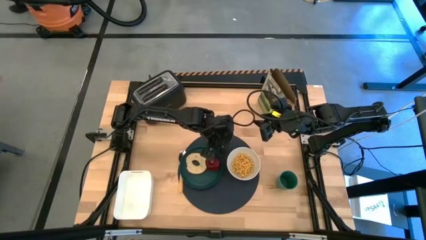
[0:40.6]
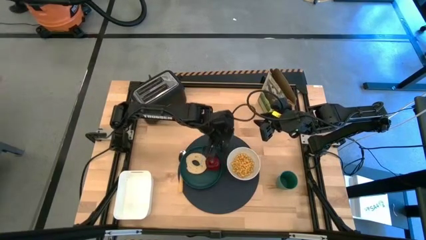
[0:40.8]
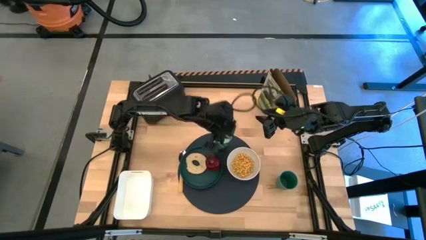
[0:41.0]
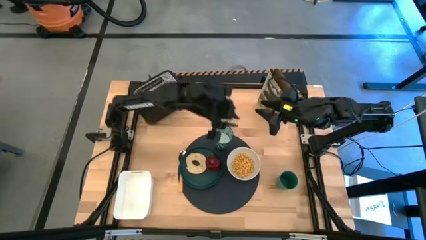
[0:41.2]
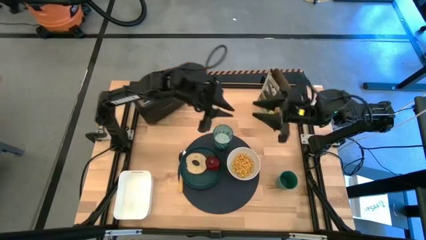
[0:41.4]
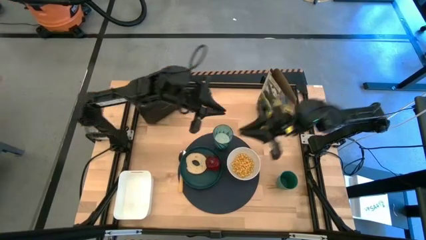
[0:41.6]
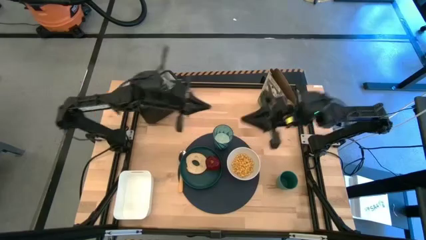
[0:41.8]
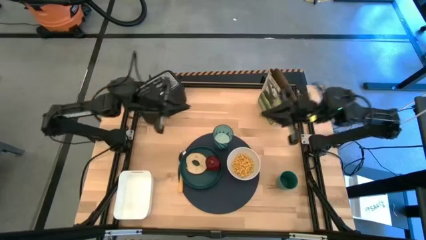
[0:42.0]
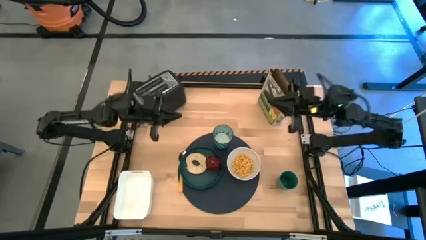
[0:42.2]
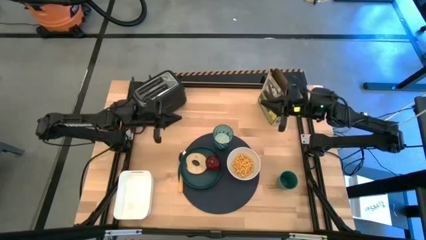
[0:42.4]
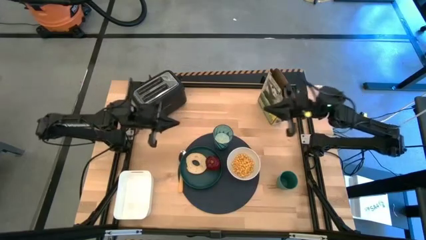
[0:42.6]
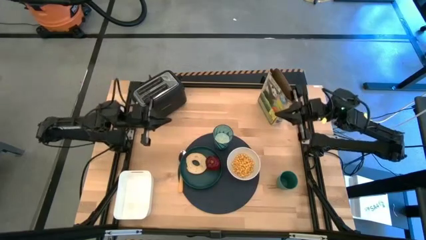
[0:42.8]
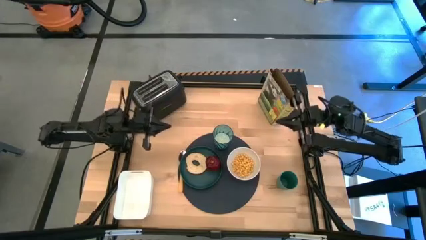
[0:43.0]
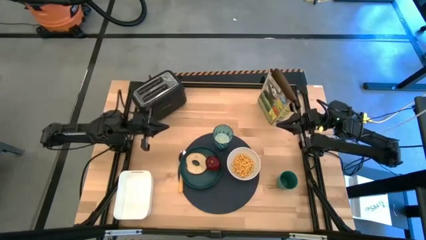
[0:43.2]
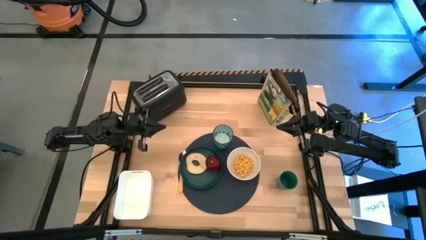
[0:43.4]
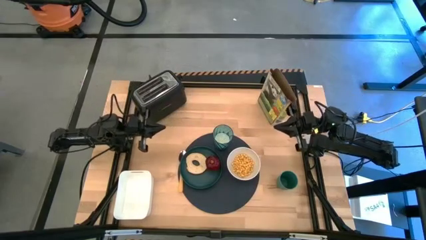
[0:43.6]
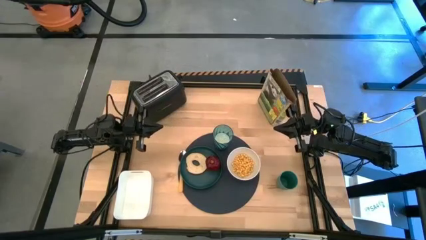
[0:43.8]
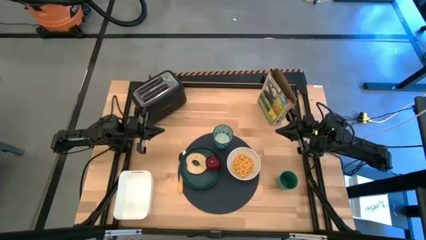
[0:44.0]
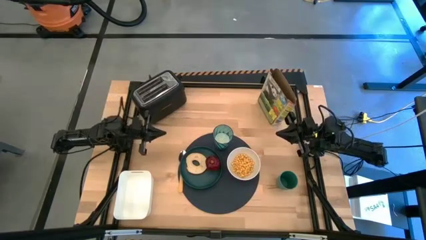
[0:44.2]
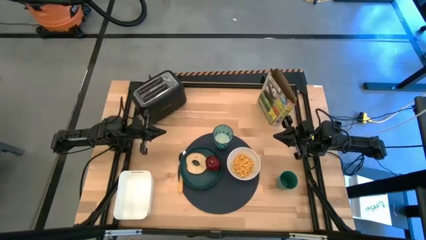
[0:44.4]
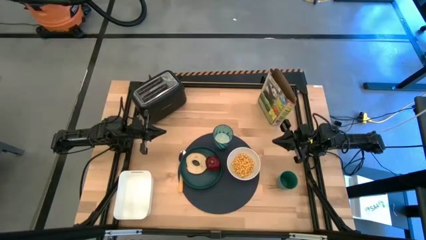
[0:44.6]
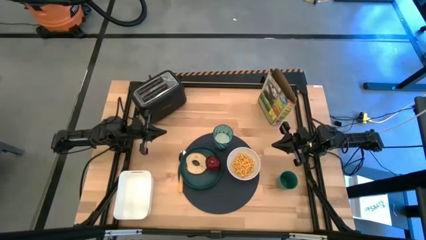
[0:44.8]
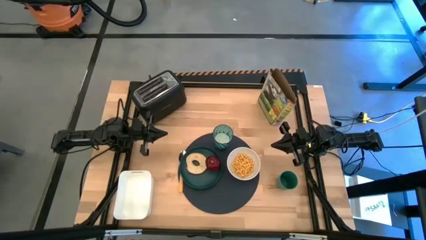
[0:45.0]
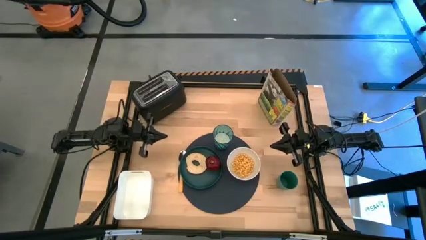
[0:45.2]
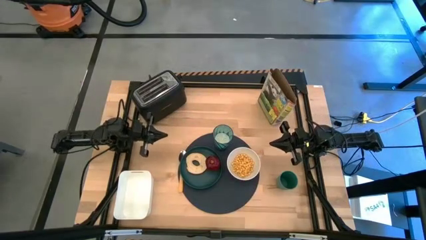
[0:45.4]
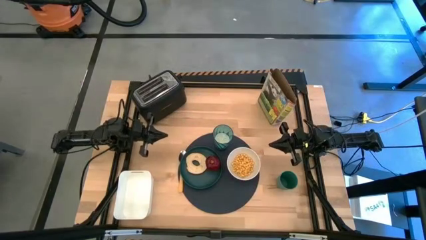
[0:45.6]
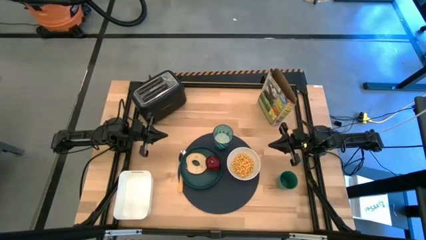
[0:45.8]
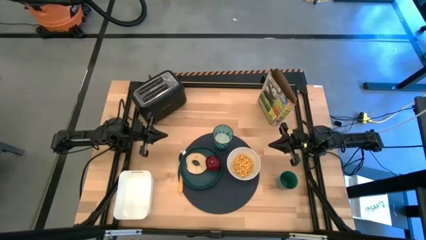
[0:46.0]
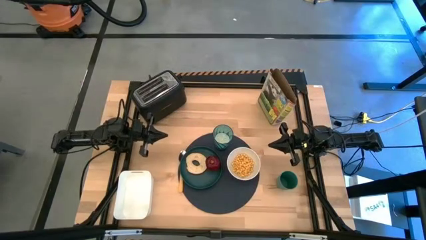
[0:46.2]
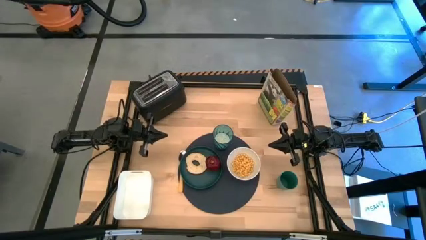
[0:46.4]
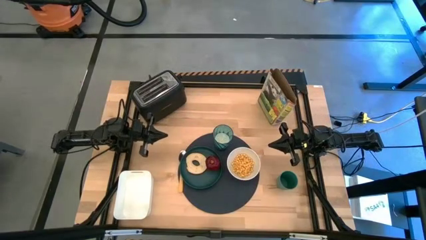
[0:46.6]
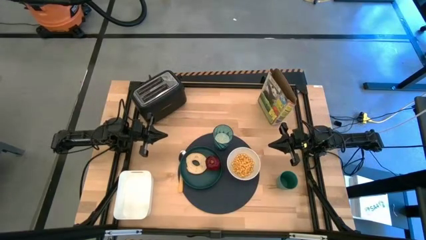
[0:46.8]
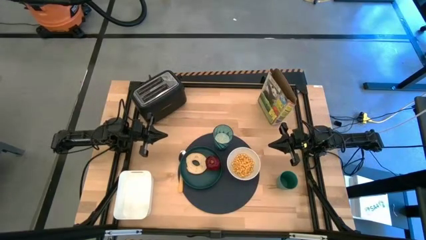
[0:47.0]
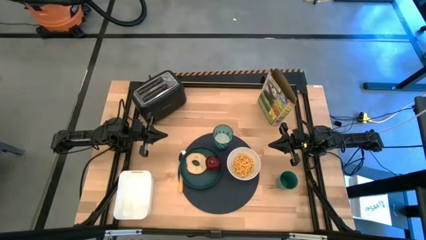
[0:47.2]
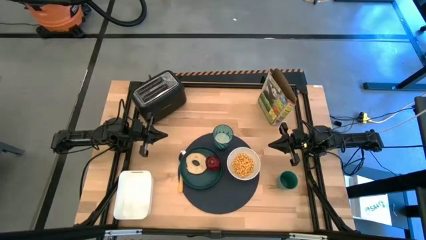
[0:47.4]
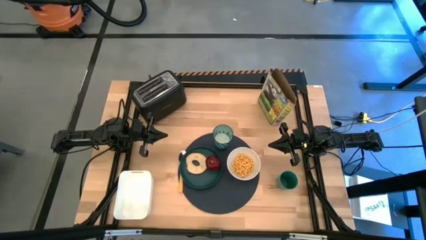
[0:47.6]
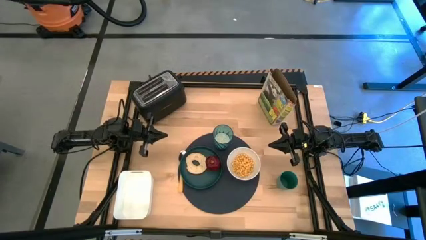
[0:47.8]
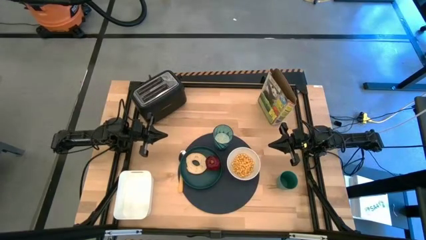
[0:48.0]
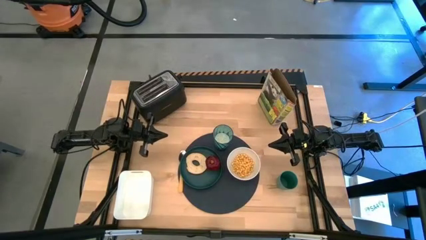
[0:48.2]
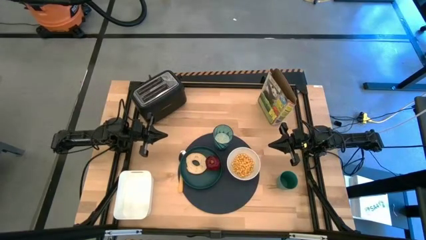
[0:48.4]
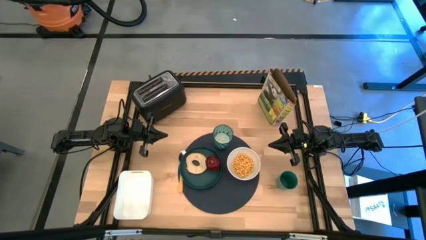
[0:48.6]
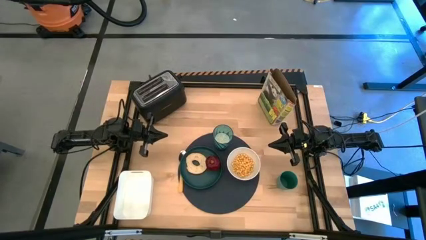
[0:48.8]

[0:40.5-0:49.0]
Task: Arrange a breakfast setting
Return to Home position

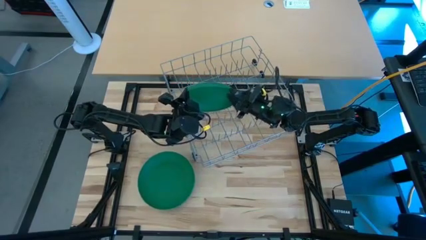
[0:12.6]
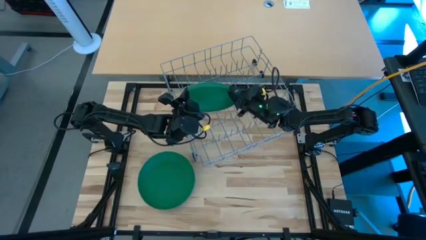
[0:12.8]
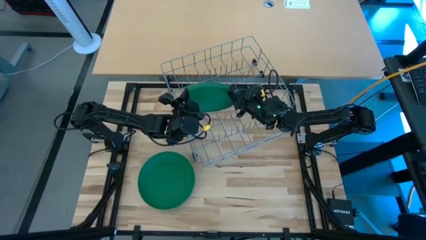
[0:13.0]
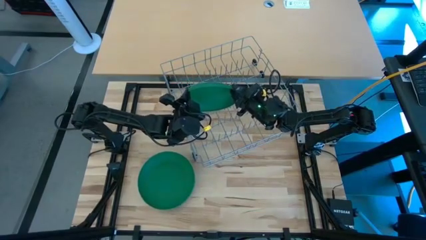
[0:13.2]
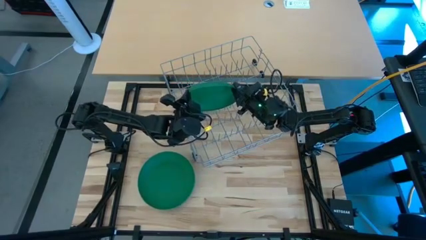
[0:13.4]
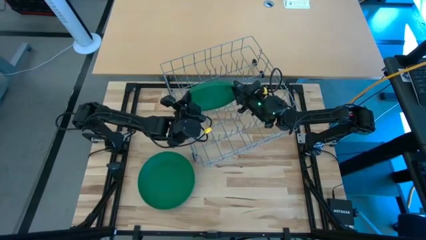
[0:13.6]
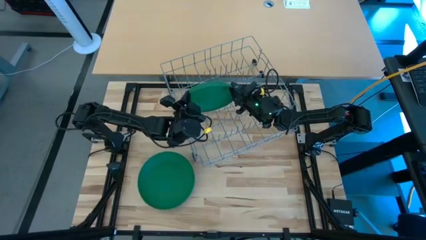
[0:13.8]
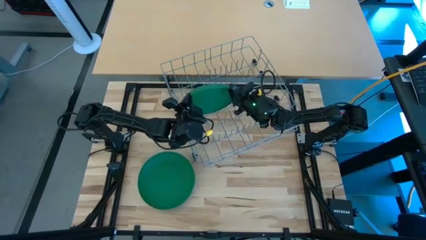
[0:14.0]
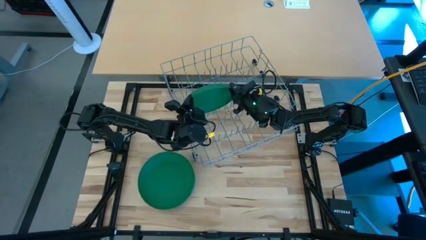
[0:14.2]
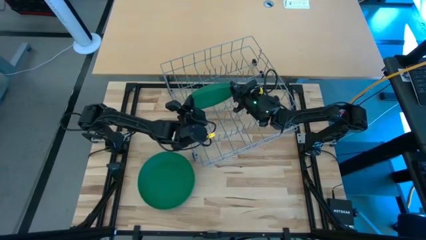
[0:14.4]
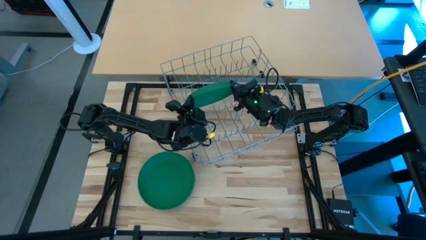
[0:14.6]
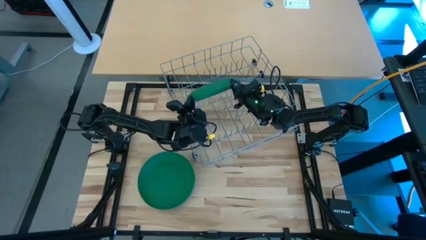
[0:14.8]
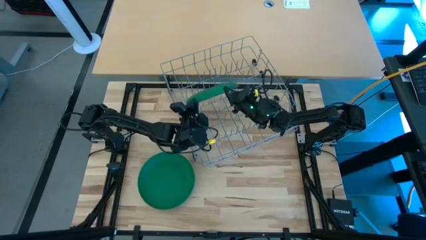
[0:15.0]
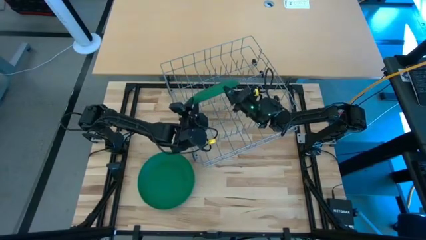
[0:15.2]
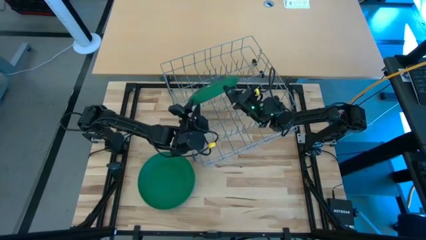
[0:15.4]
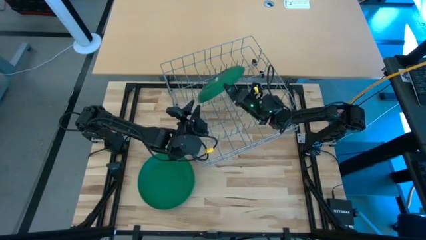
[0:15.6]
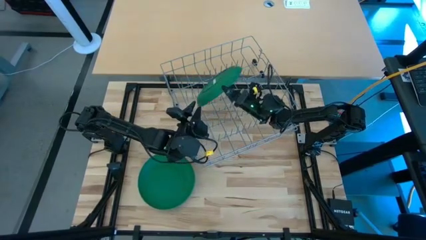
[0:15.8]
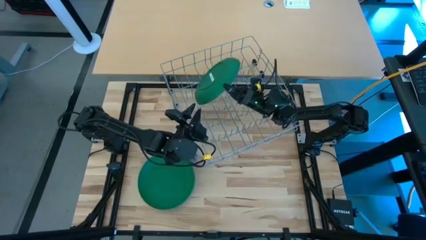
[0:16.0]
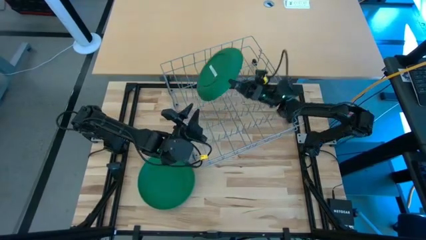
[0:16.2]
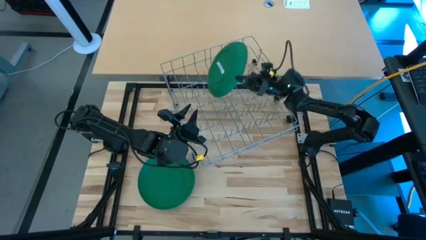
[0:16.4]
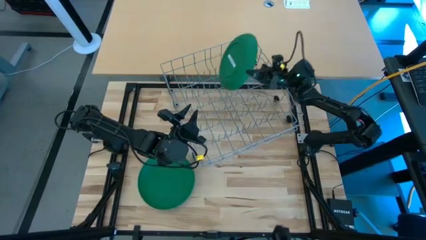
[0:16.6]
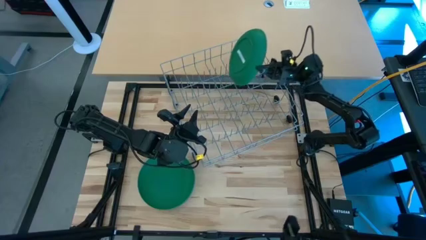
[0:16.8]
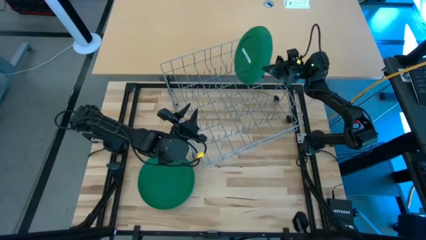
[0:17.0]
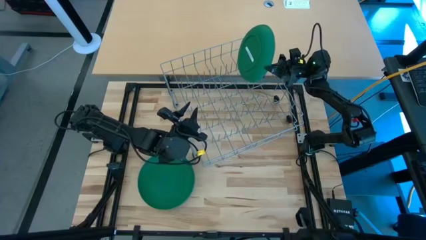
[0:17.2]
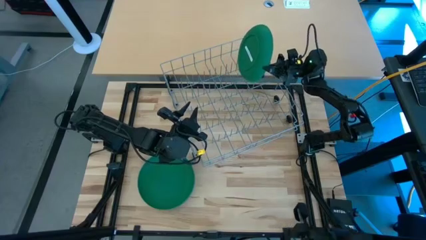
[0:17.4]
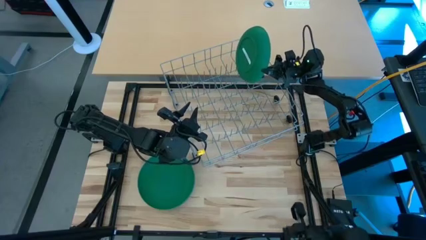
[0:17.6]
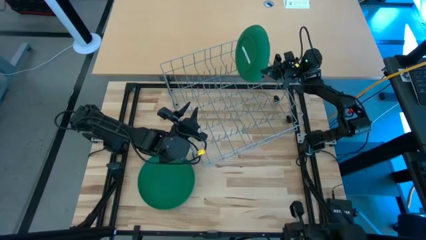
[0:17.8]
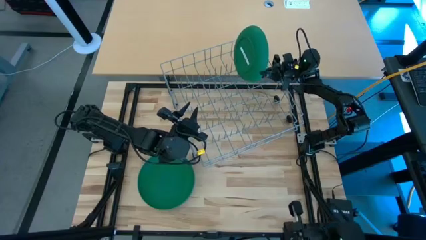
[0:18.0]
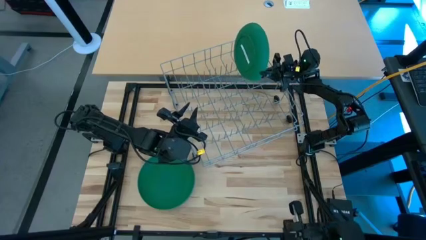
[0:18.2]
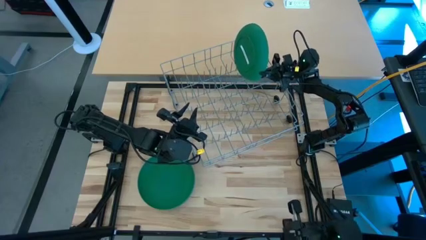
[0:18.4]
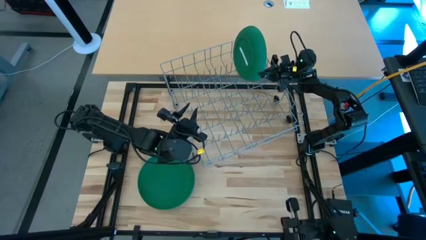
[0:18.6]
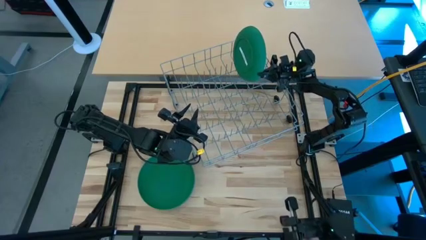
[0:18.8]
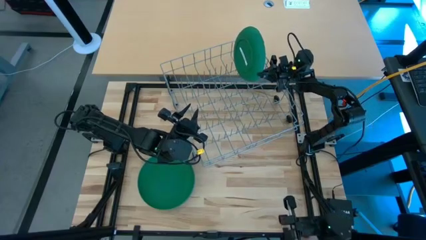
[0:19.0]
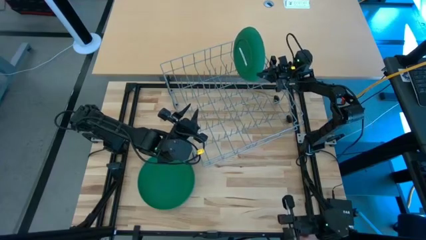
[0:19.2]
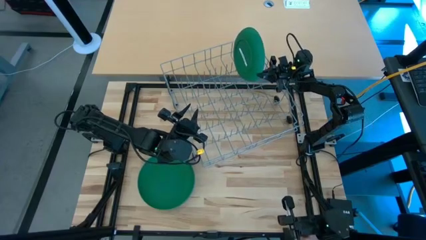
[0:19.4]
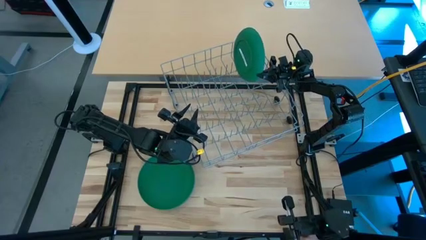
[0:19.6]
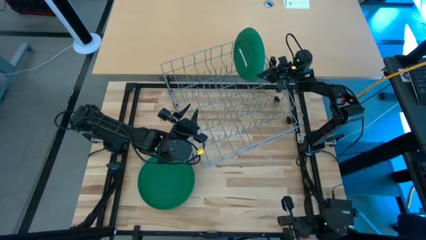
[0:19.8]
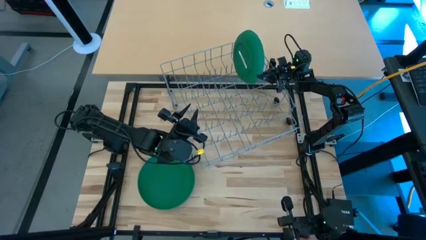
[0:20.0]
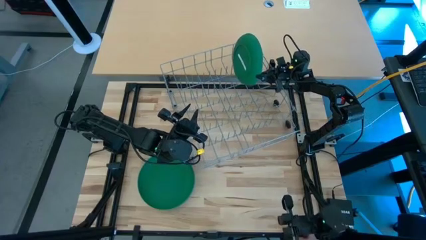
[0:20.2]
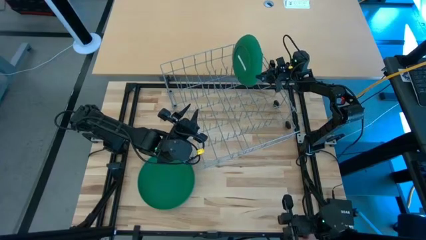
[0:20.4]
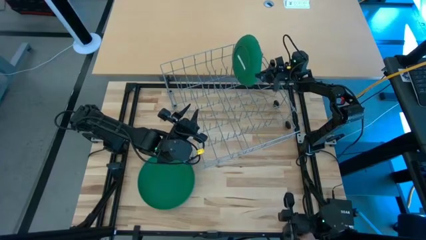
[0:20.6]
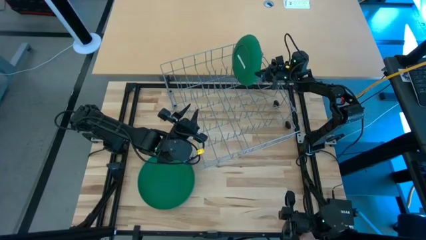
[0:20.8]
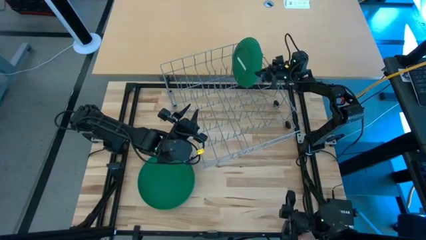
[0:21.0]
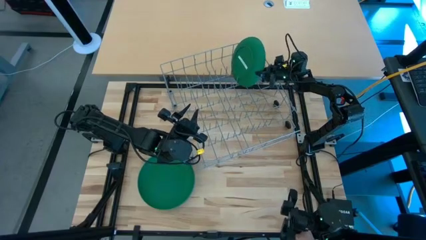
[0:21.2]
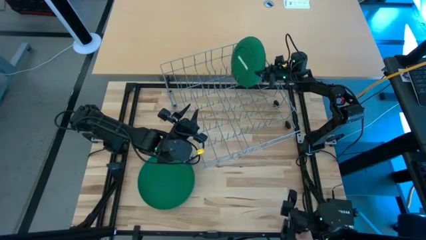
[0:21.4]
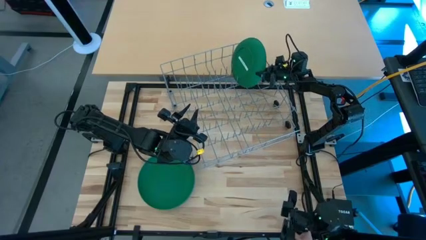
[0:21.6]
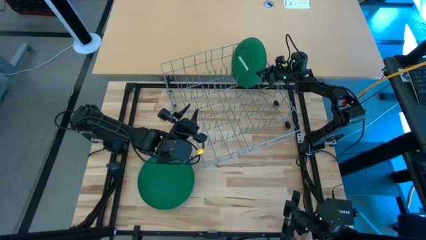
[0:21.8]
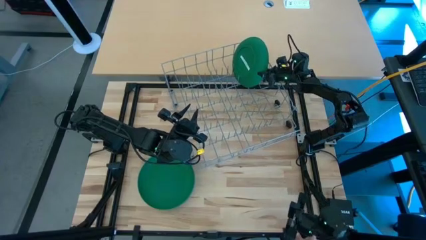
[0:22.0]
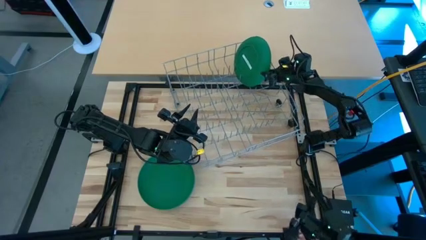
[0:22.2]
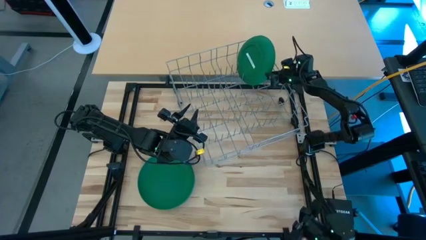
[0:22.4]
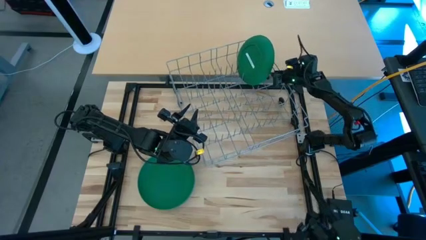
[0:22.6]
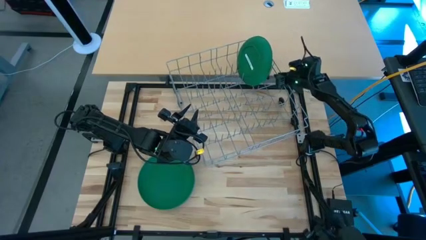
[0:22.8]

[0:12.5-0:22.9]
Task: Sort dishes
Put the dark green plate in the dish rack
